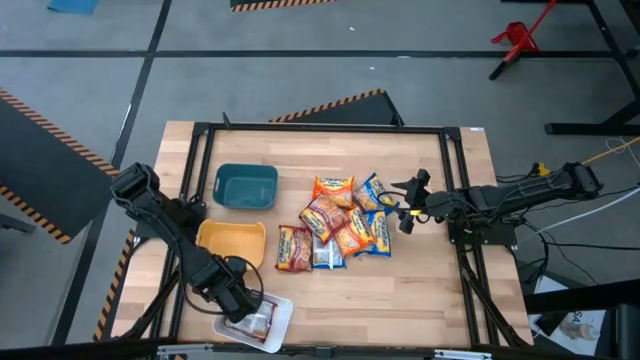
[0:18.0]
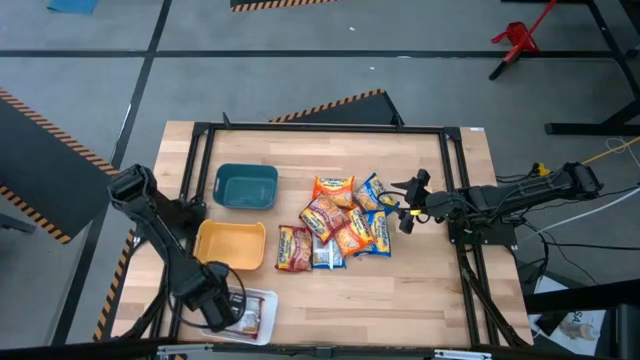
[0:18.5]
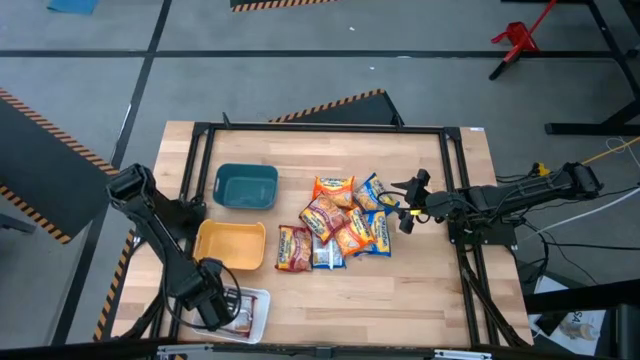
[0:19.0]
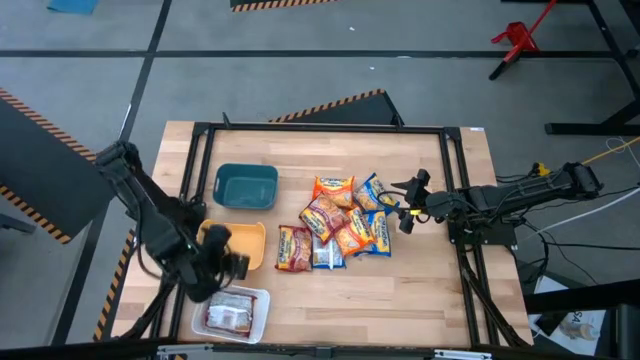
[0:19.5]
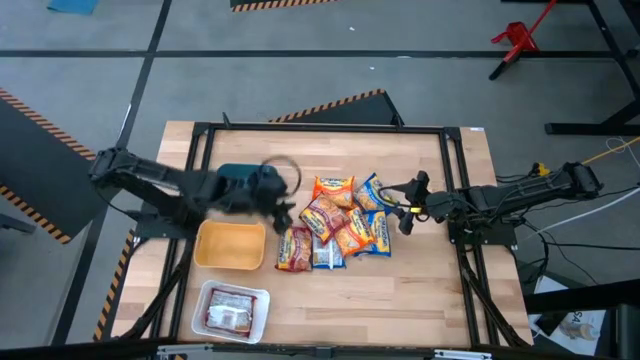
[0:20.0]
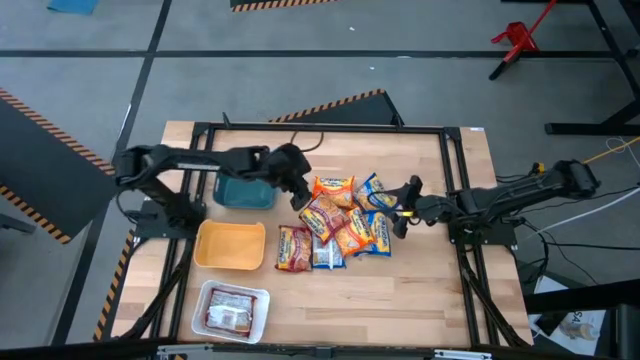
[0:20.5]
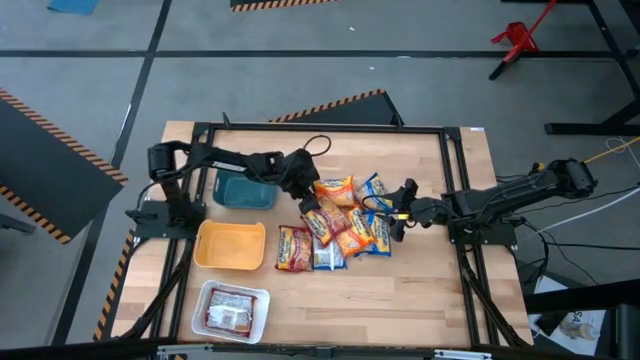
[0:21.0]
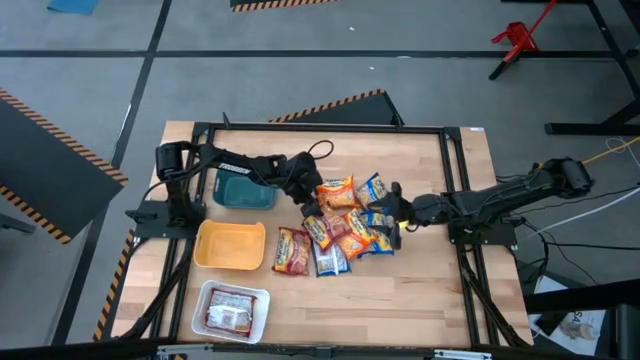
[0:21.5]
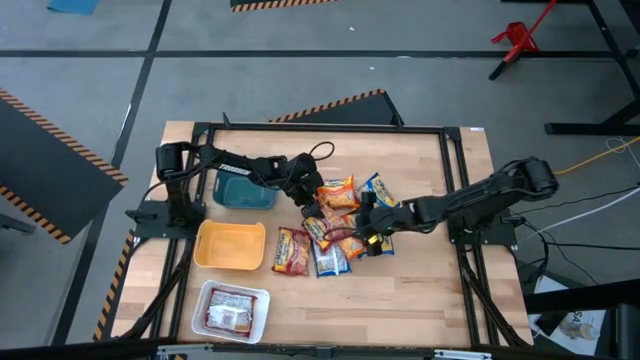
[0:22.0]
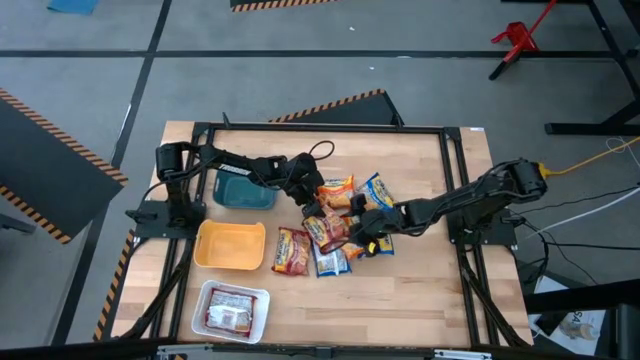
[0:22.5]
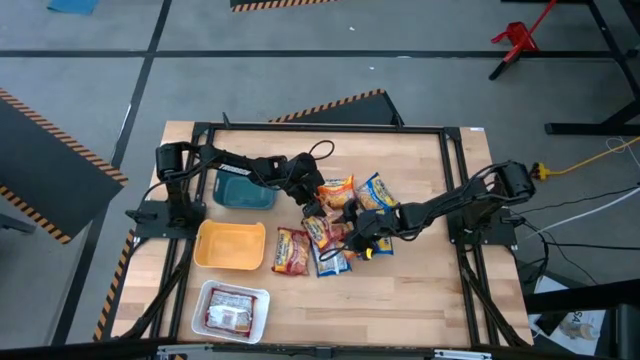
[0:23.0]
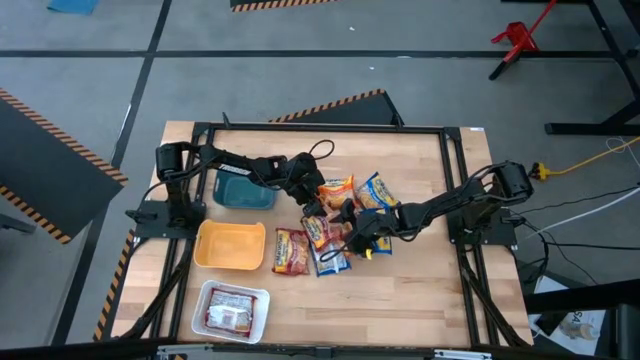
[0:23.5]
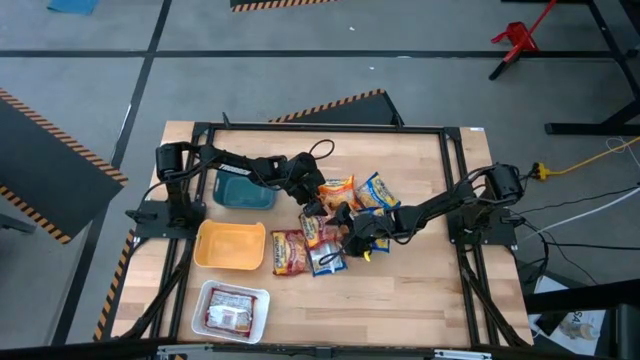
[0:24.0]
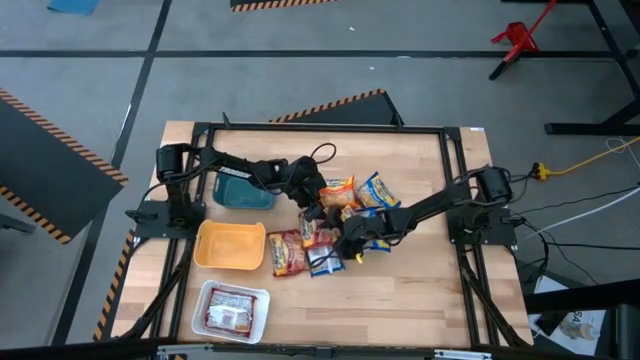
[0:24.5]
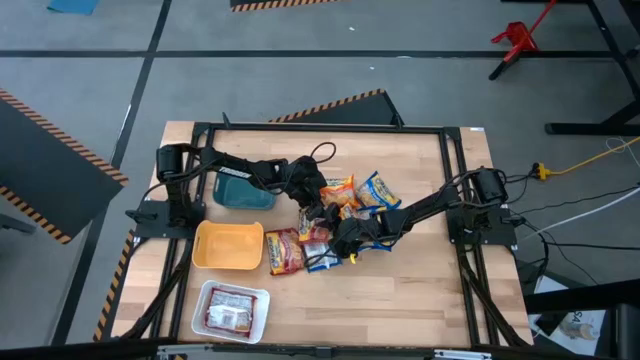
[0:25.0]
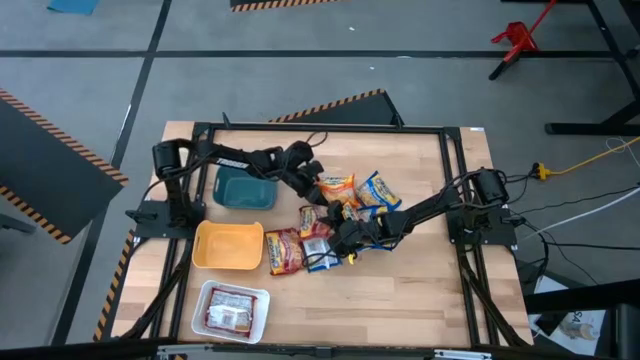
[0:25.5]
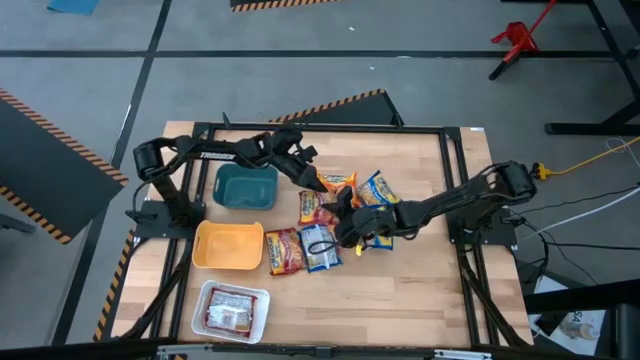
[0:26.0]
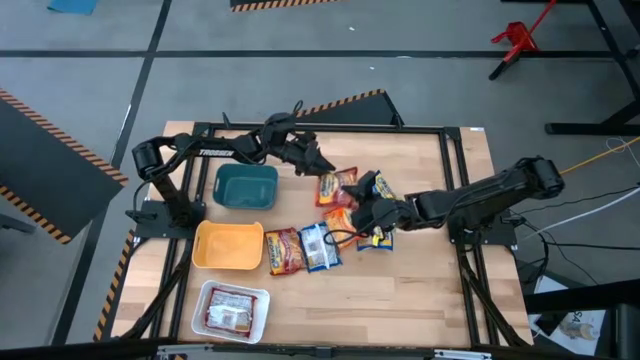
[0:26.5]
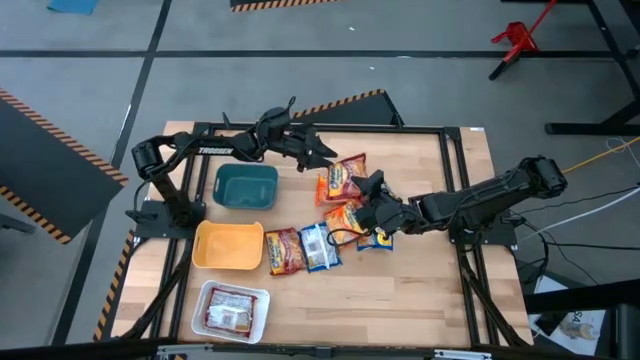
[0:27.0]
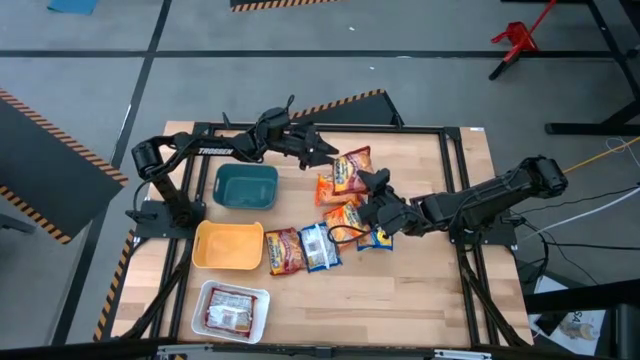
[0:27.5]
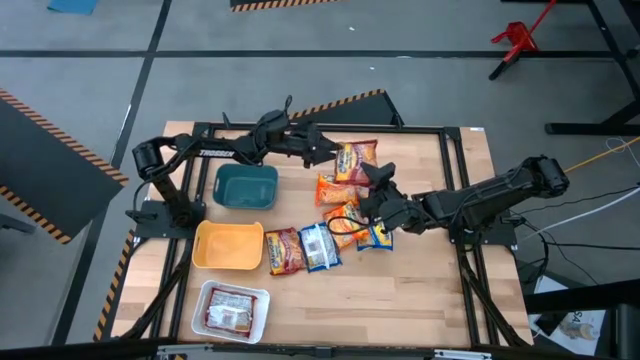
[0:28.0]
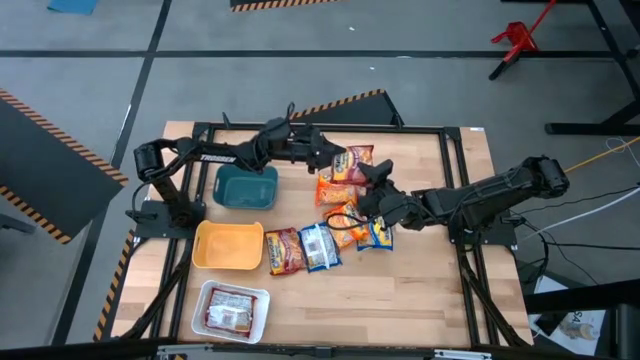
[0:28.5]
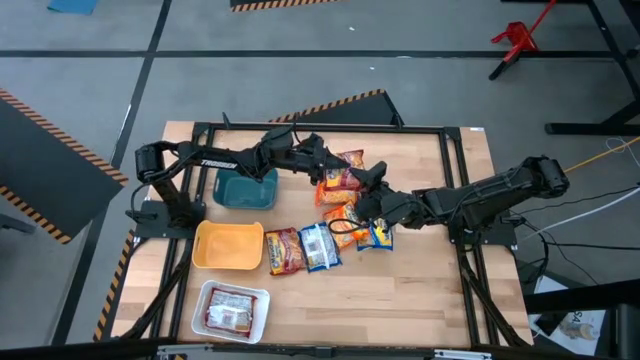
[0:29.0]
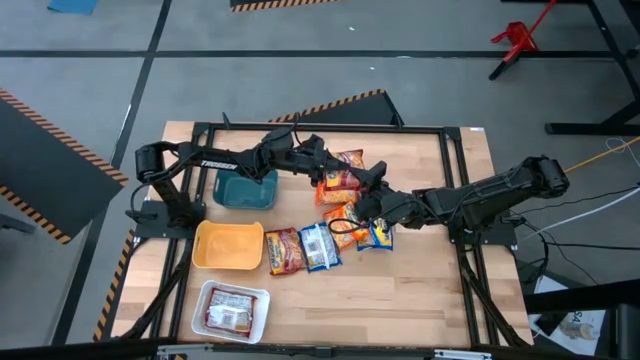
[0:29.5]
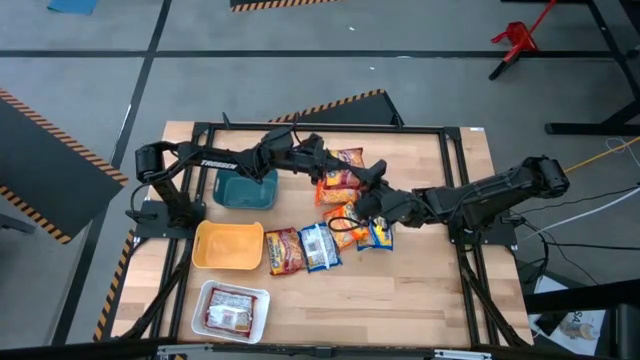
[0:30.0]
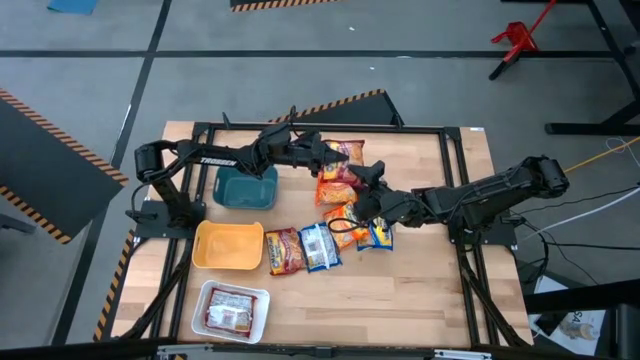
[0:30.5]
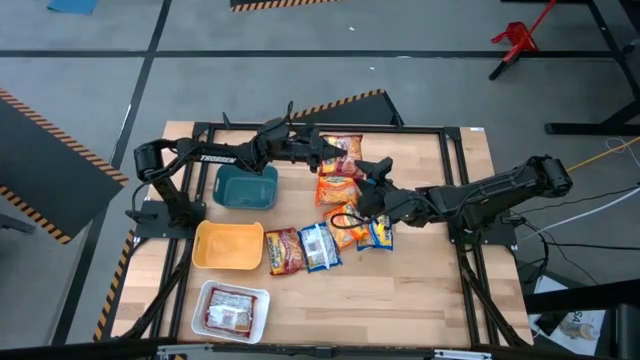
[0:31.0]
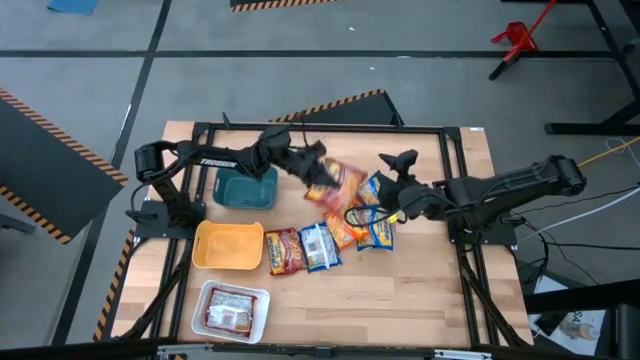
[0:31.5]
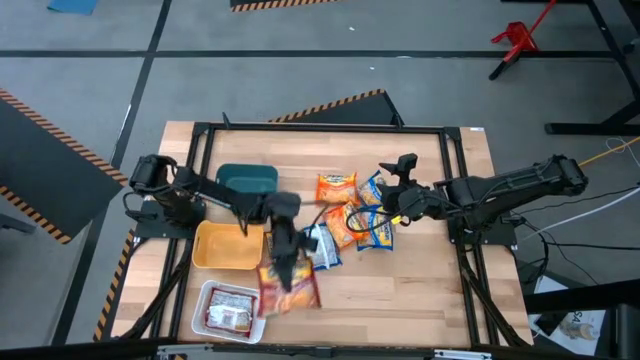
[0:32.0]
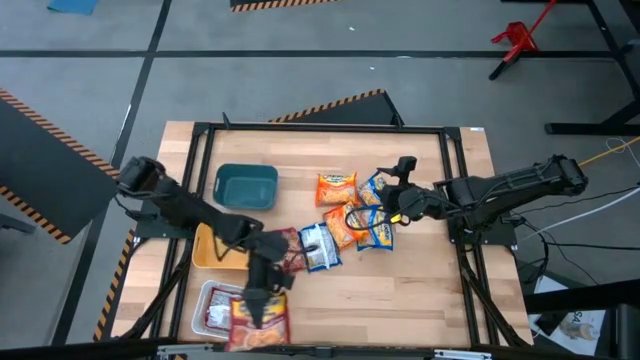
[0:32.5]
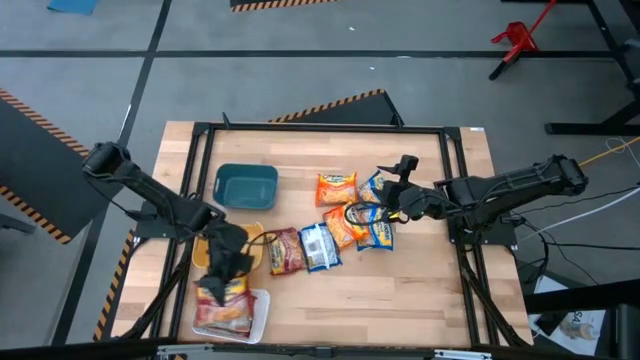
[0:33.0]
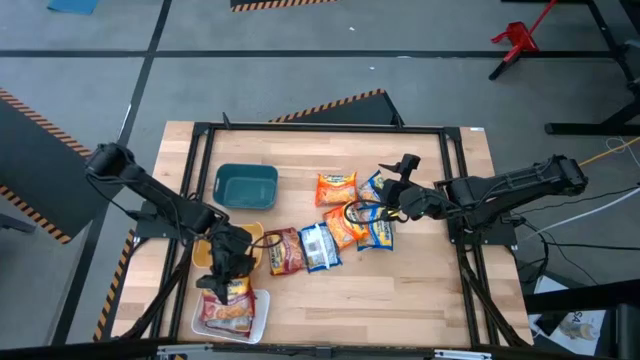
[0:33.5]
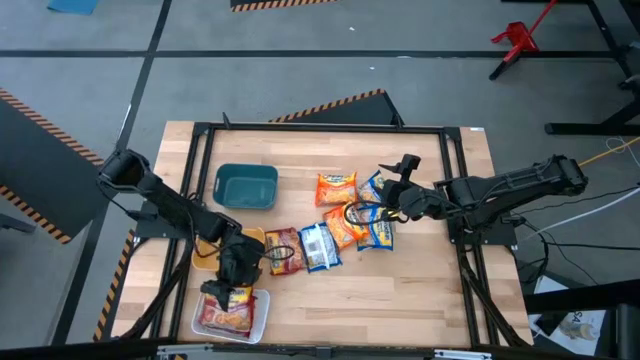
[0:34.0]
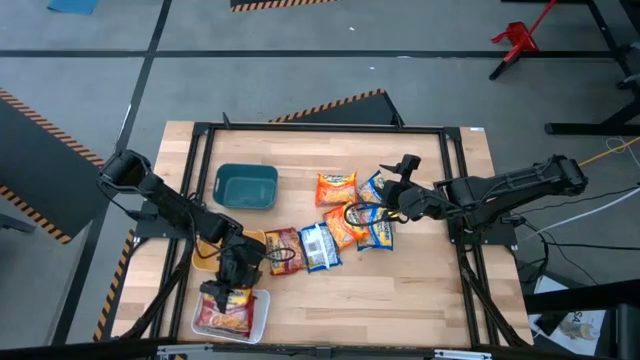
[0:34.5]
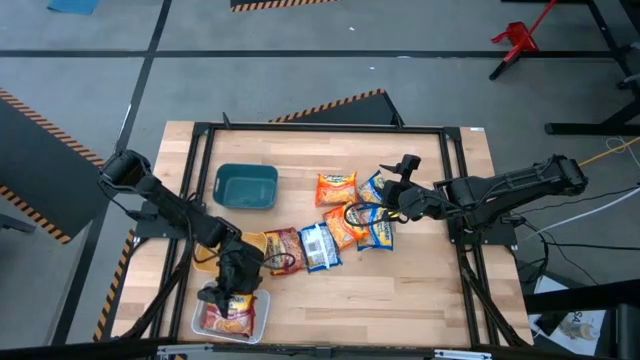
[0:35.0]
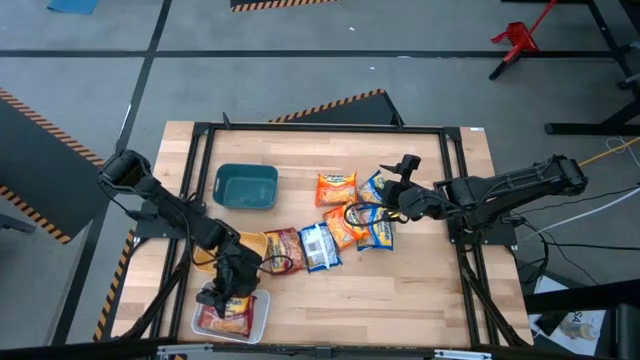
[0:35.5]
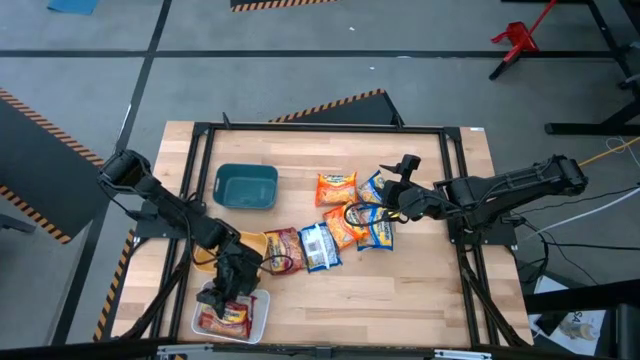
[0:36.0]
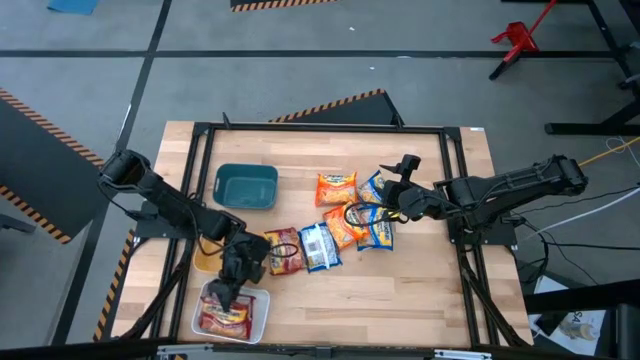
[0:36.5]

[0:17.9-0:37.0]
Task: Sort Maruchan noodles
Put the right red noodle pack into the white bin

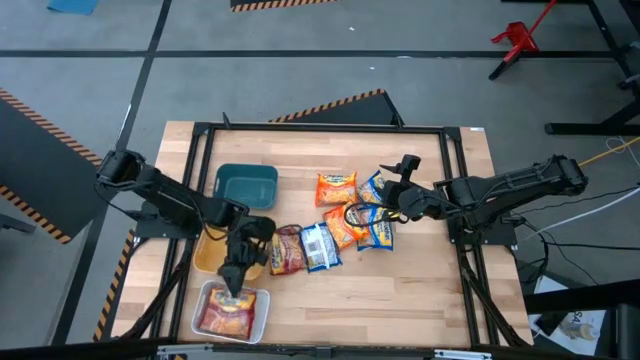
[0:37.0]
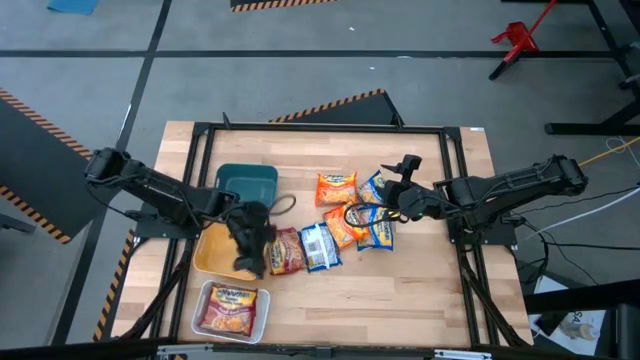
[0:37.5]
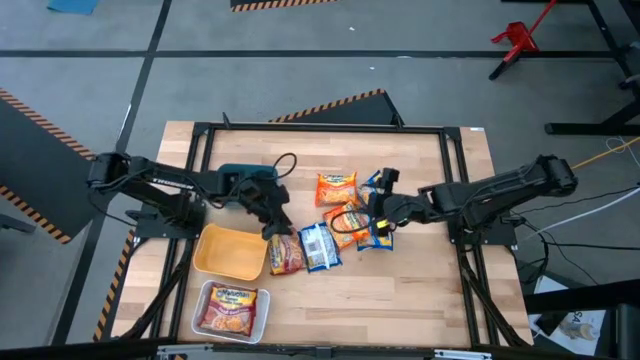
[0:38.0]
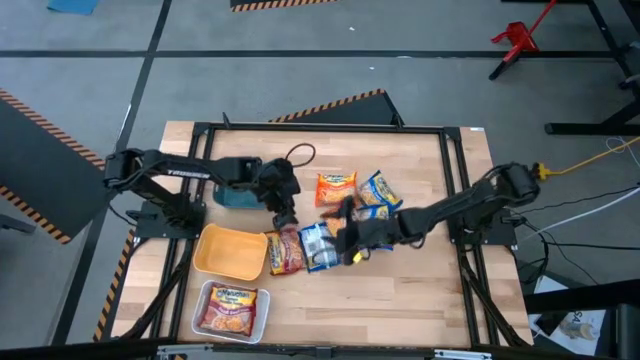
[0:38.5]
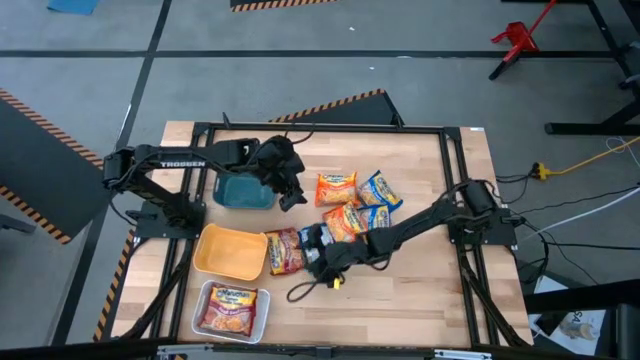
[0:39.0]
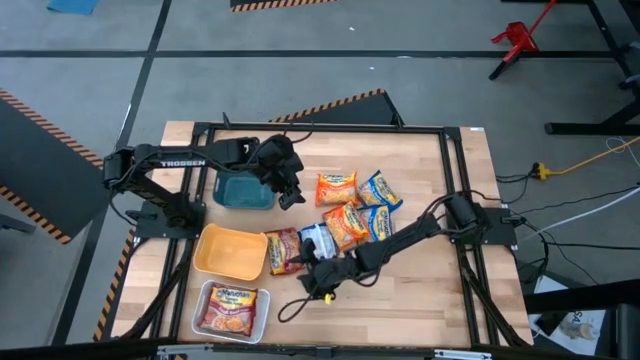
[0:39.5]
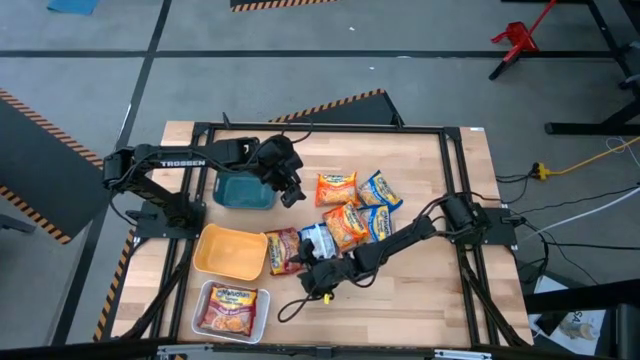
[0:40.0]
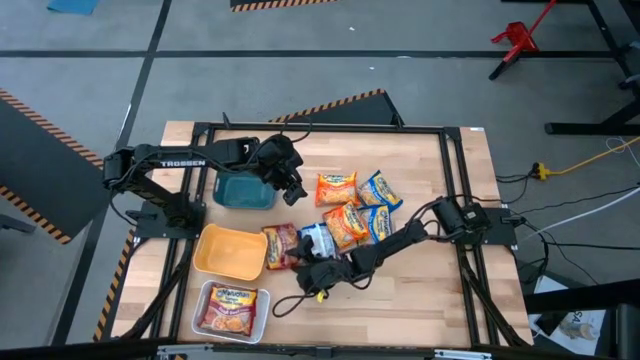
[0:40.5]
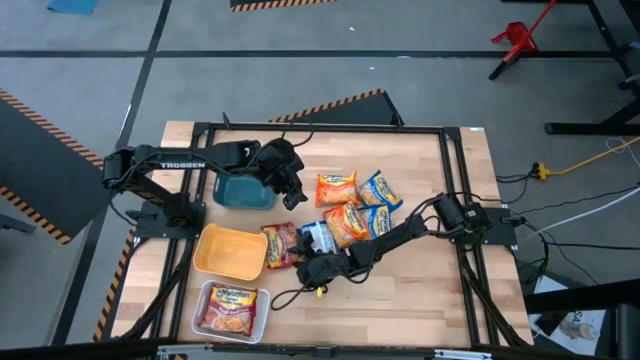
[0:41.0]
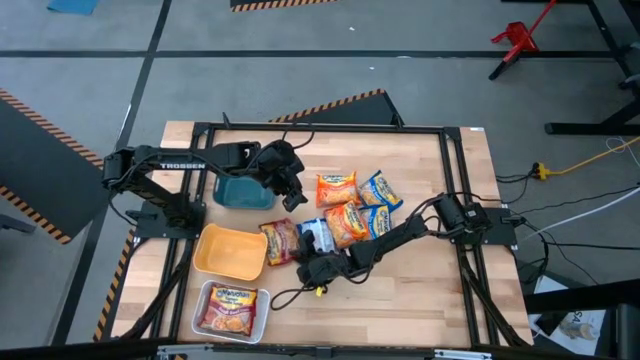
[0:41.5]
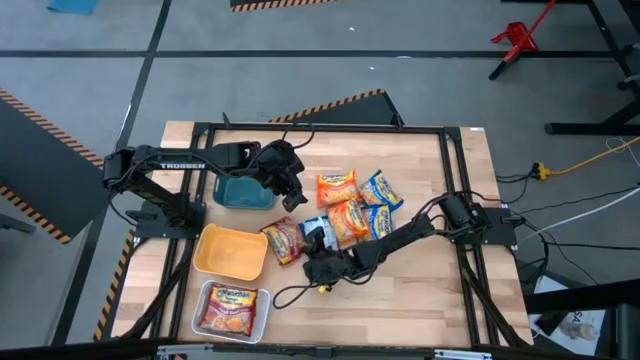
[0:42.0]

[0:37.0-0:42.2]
Put the red noodle pack into the white bin
